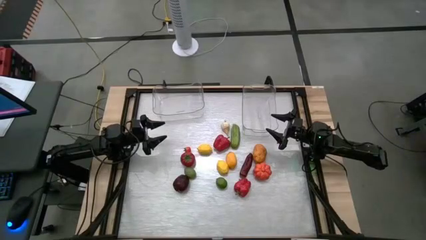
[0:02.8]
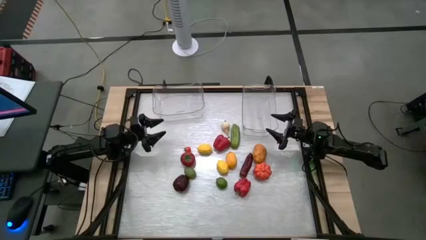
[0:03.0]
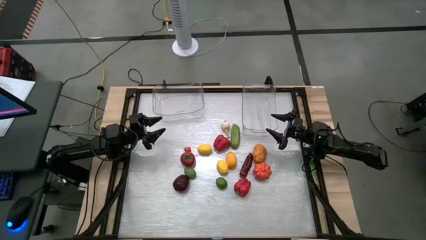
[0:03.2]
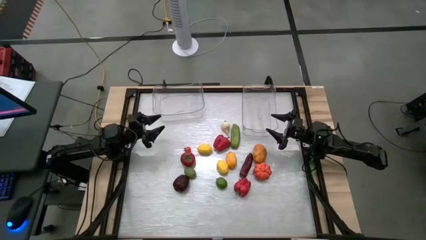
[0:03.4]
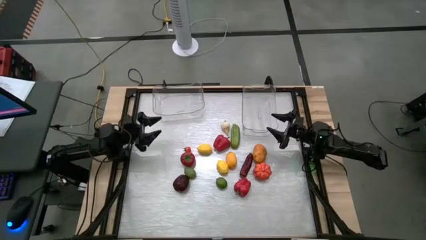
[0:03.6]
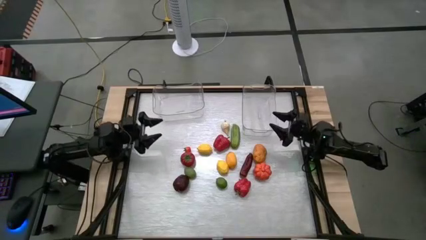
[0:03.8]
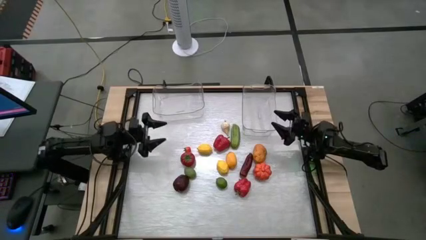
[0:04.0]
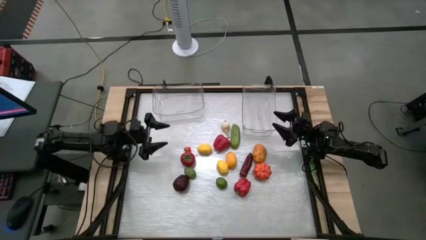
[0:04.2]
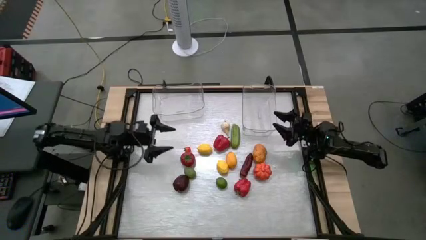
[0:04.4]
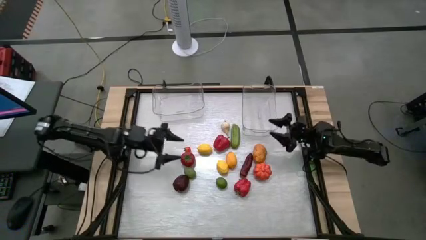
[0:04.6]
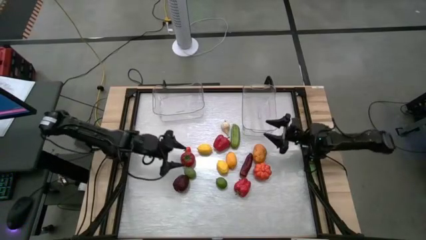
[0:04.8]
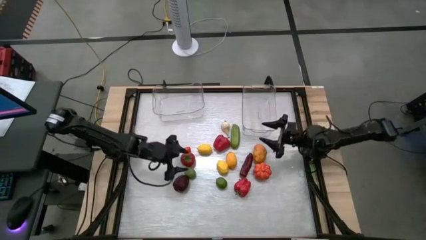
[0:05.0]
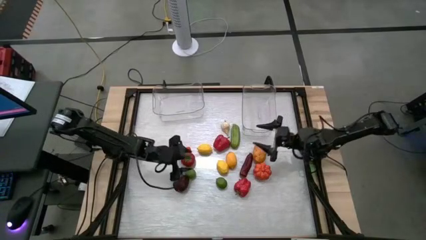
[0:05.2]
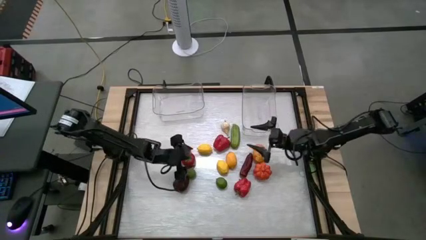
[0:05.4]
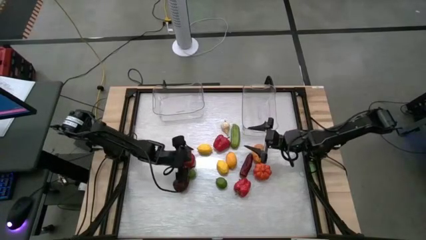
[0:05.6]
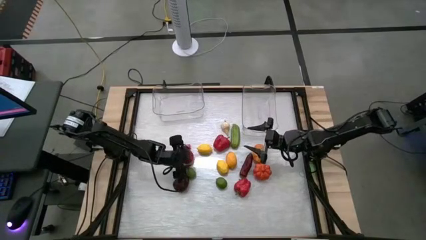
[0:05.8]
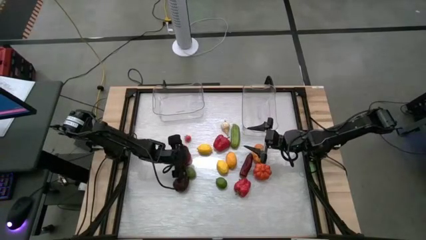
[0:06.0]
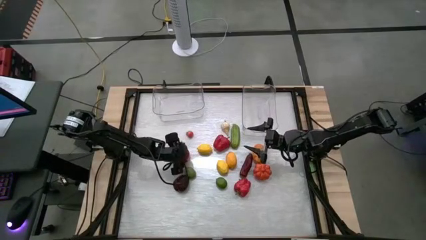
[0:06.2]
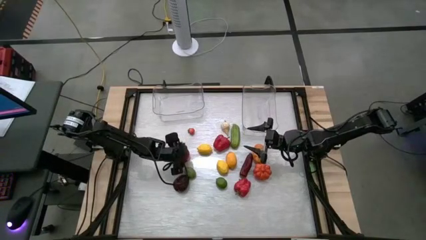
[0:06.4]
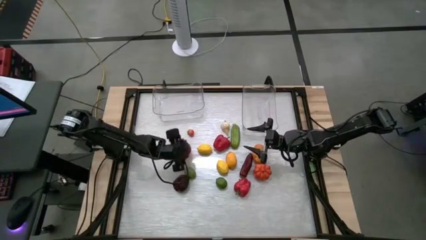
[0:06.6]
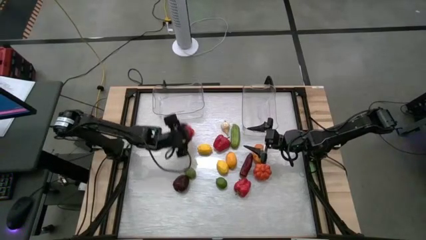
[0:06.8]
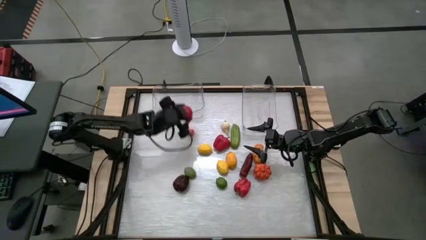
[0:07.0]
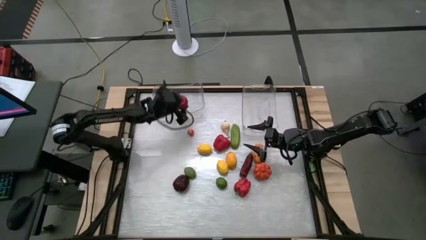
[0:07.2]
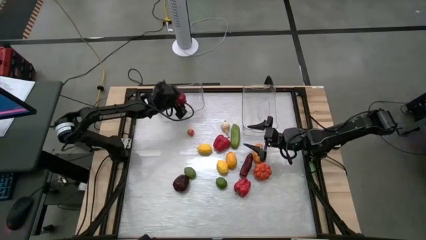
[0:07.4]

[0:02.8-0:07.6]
Task: Sort produce into baskets
Put the red tomato into the left transparent bin

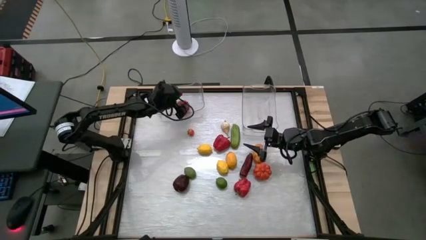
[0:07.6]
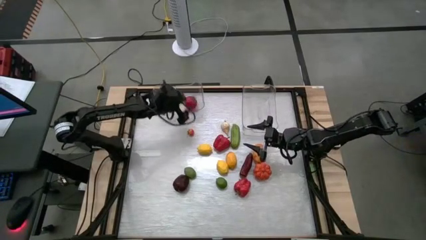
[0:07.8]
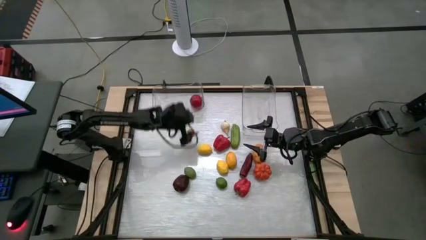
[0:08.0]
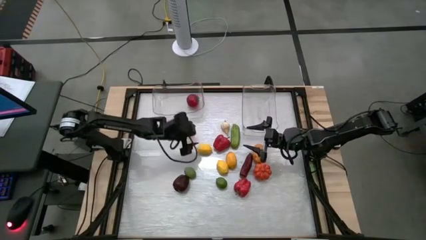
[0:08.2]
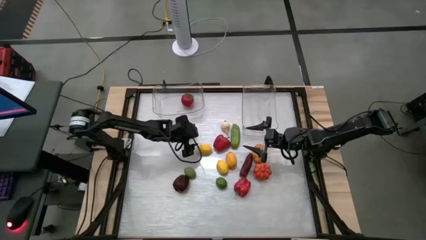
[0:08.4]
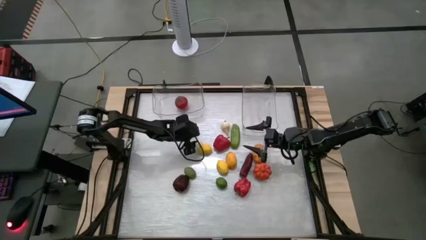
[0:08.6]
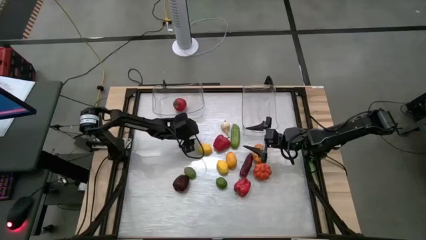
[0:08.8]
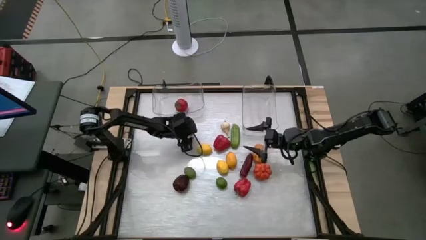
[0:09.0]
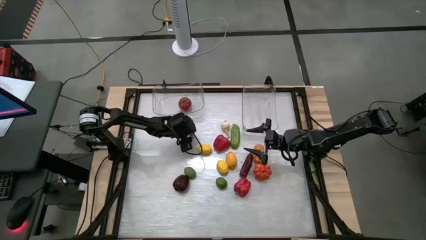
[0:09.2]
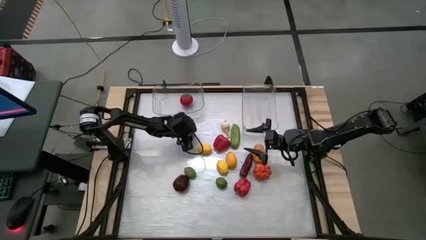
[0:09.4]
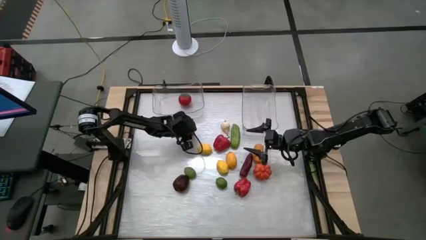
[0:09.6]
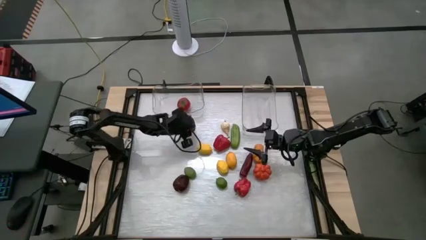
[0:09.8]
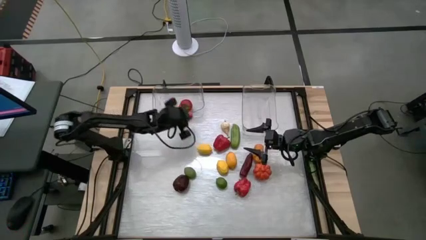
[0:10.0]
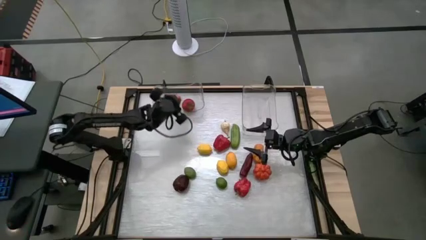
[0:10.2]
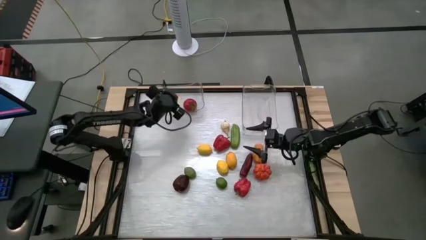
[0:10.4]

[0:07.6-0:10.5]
Put the orange tomato into the left transparent bin

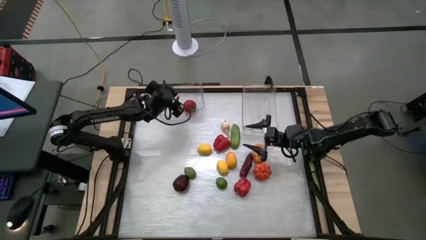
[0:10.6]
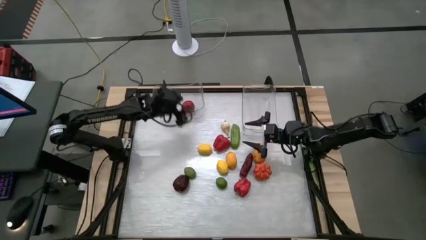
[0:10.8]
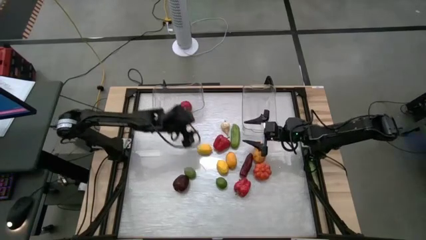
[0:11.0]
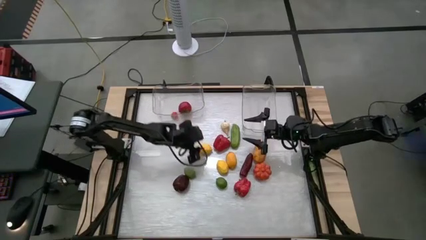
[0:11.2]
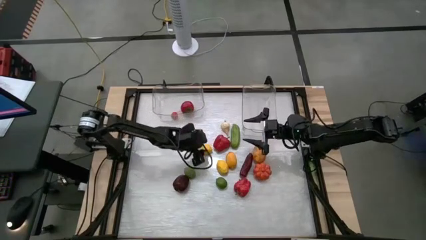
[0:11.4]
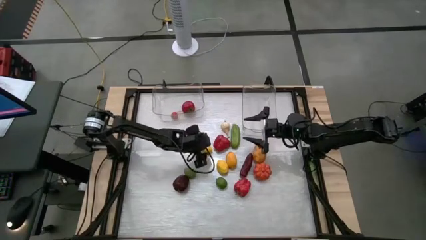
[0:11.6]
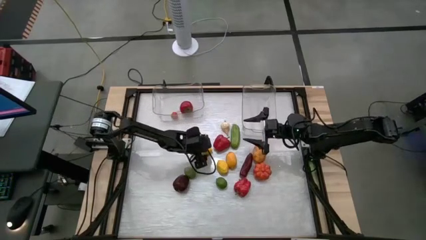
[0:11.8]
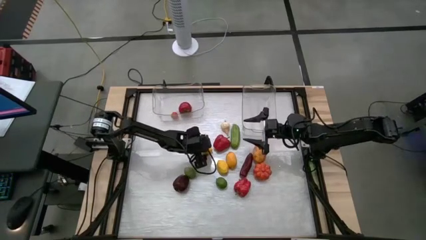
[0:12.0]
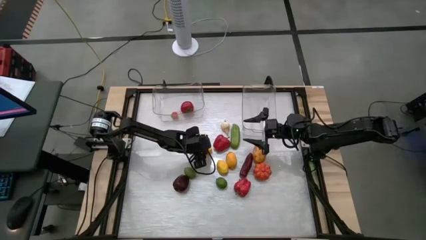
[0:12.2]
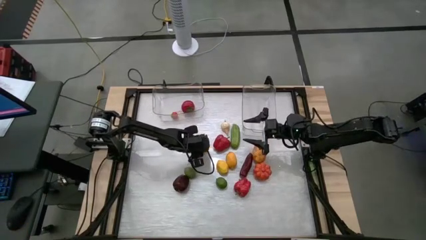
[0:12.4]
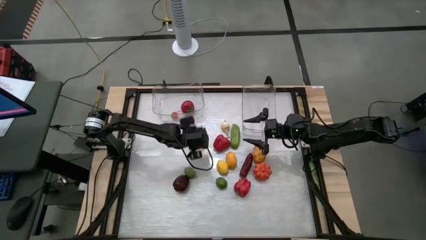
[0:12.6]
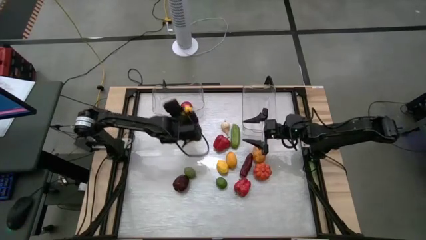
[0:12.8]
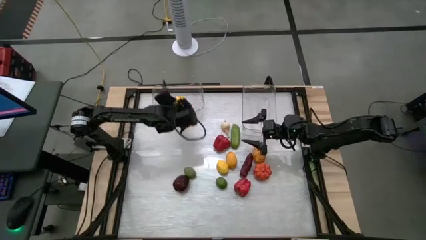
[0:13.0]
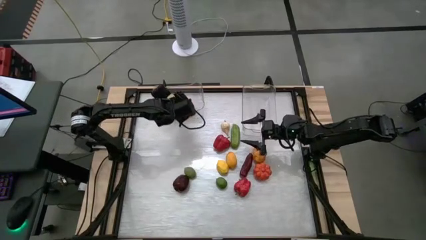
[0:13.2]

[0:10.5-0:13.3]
Put the top lemon into the left transparent bin

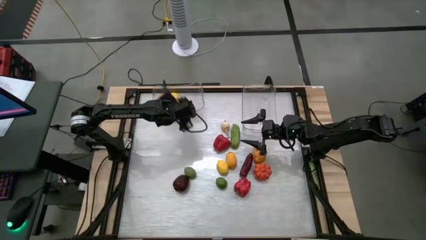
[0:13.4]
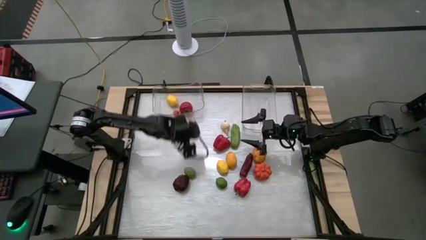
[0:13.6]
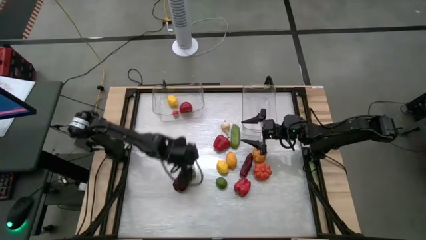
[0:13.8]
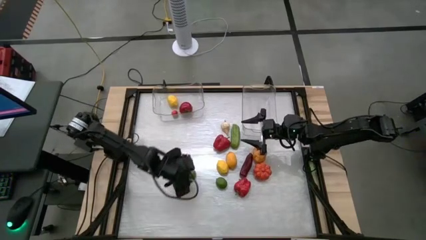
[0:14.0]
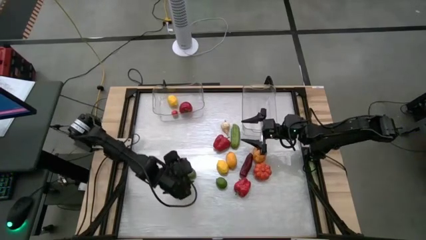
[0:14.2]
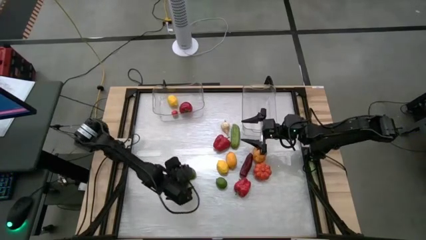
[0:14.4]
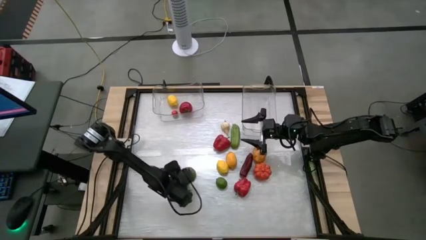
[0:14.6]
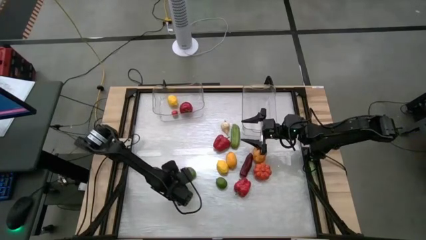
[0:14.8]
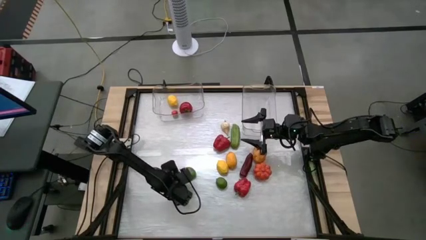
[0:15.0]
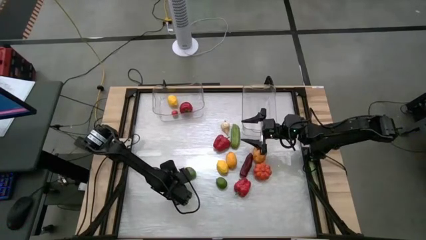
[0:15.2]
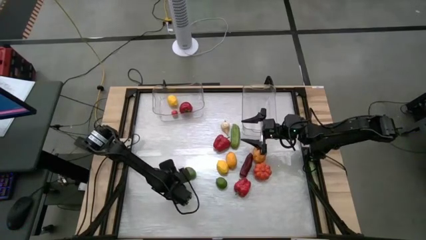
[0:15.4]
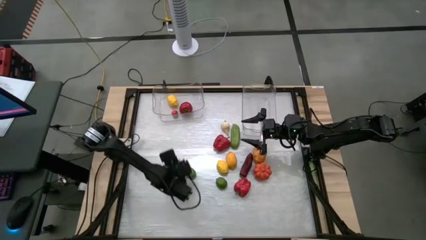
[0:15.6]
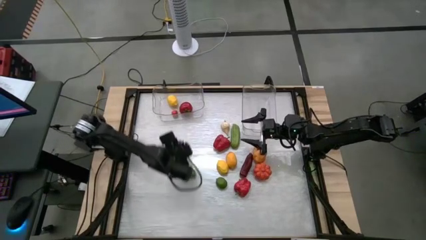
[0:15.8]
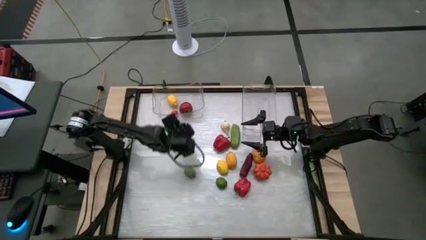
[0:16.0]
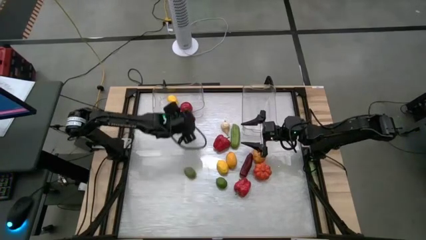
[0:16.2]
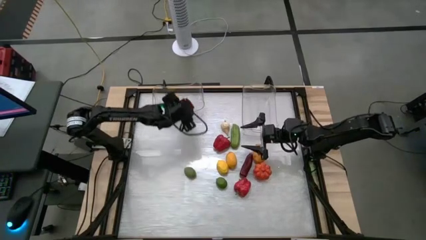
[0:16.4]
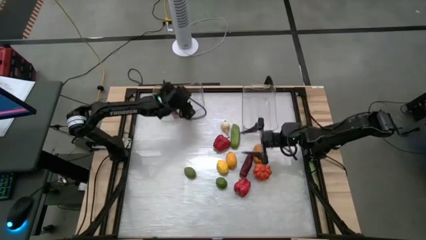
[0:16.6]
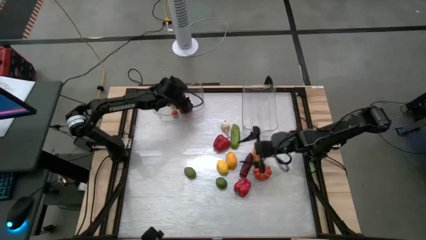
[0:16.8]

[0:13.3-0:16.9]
Put the apple into the left transparent bin

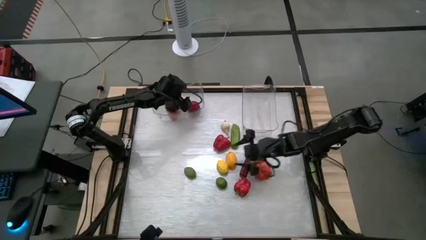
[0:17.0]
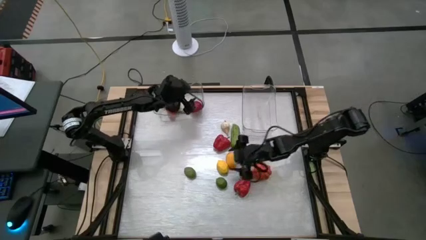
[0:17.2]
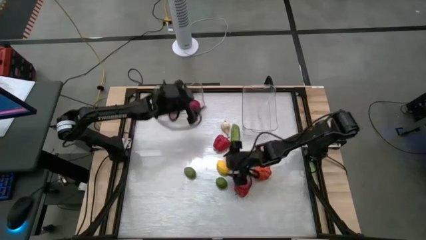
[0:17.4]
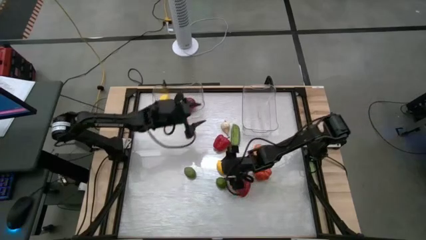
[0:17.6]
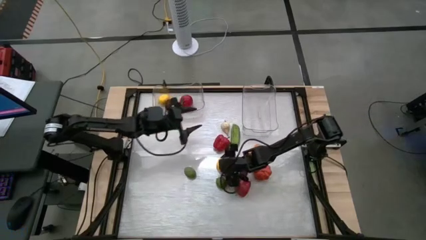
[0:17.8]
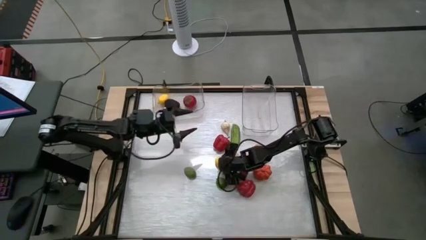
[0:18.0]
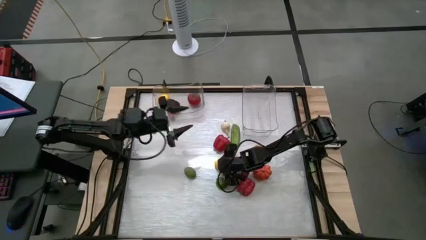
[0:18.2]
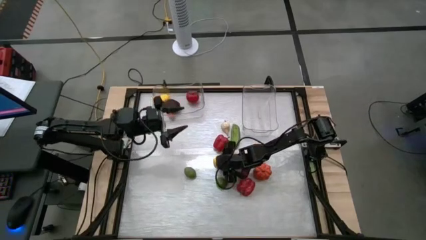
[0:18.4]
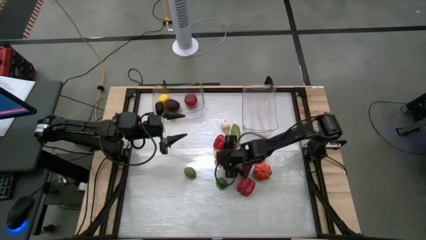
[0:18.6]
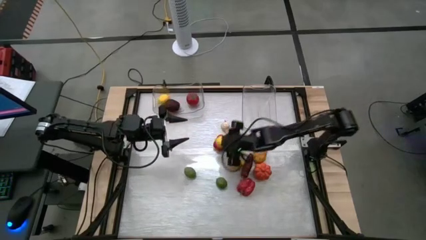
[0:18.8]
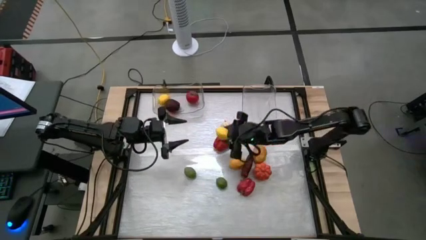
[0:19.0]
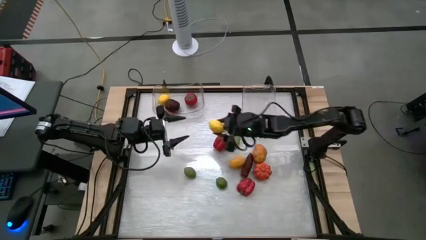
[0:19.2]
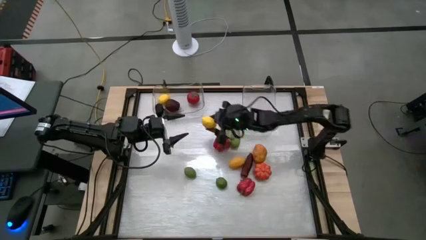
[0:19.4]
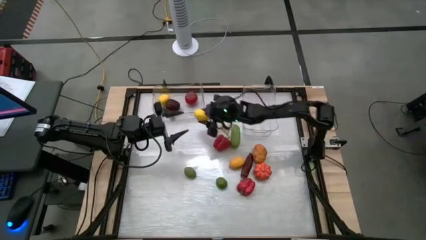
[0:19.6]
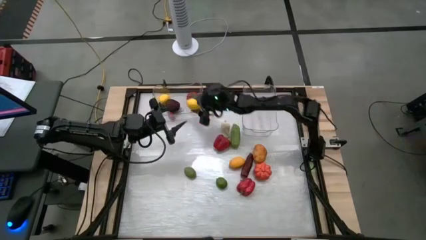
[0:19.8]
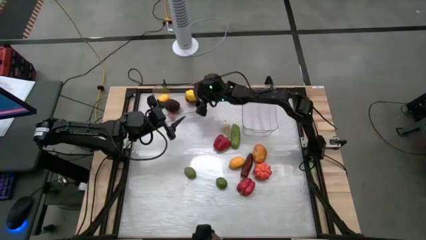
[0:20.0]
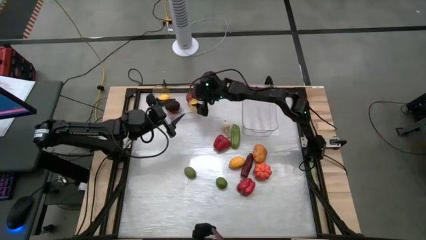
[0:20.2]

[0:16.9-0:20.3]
Put the left lemon into the left transparent bin
